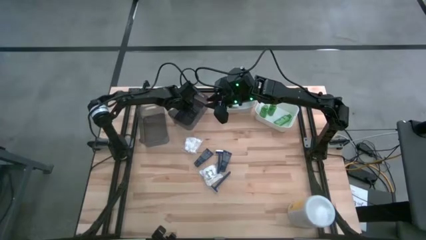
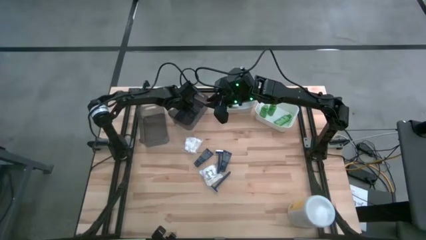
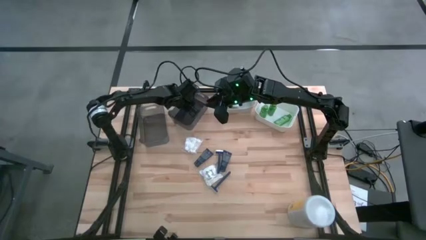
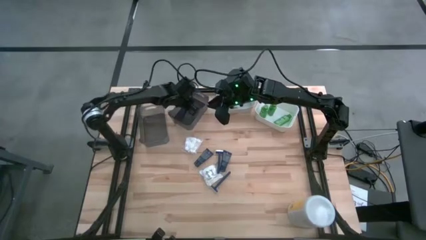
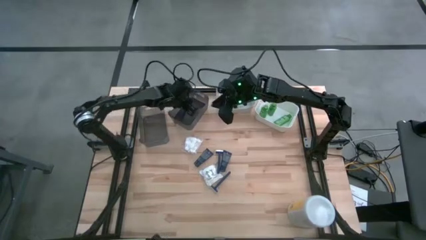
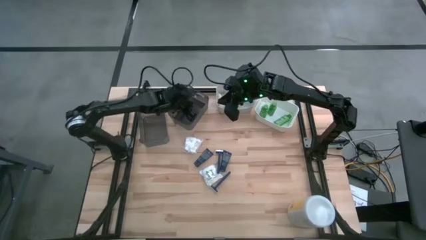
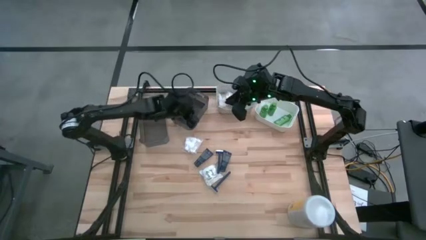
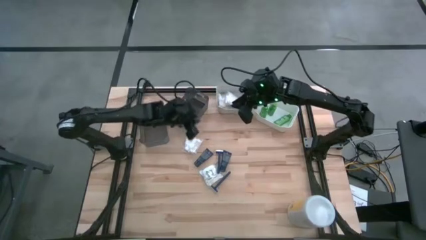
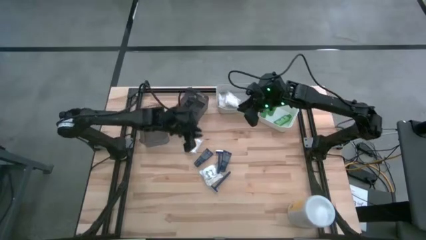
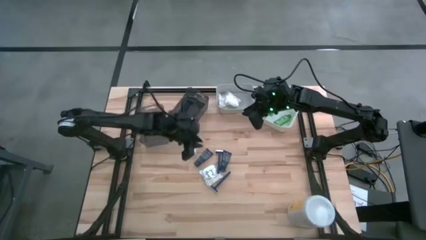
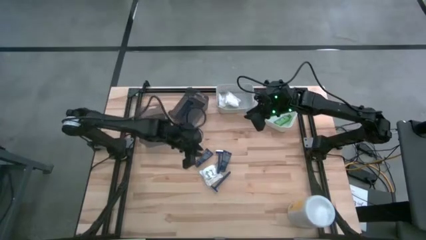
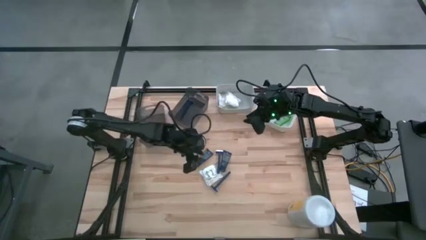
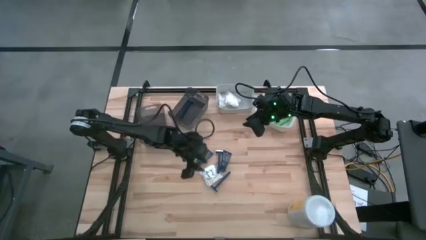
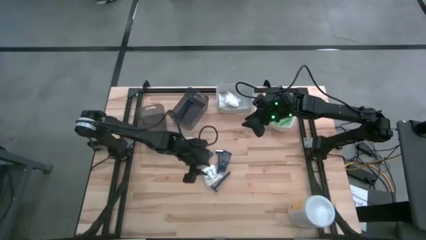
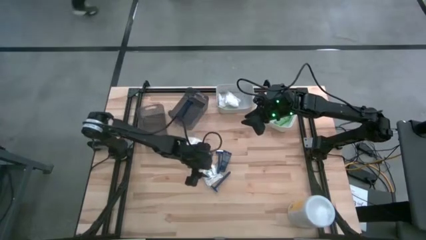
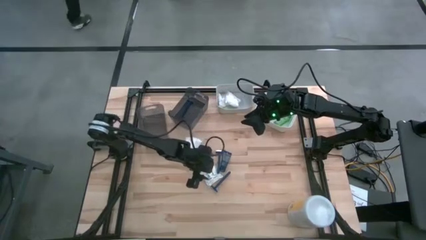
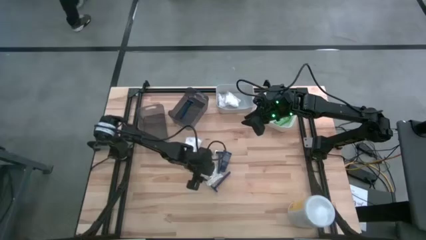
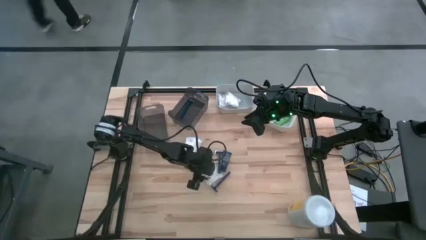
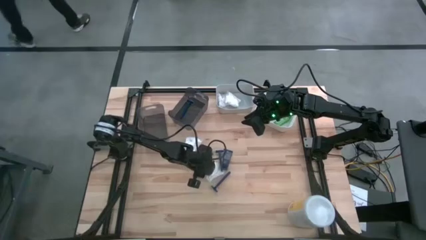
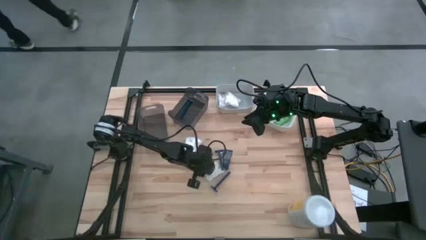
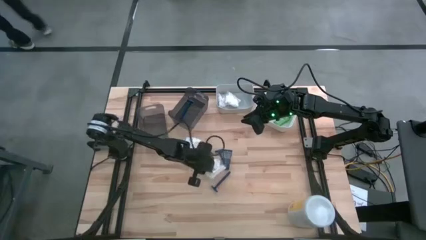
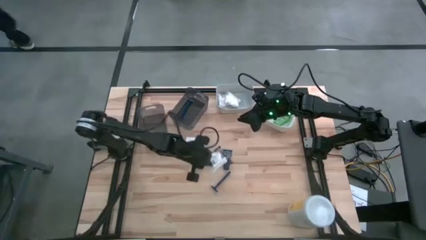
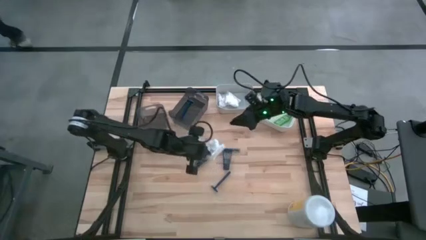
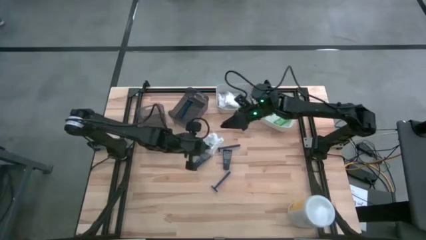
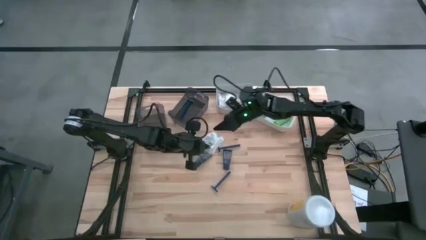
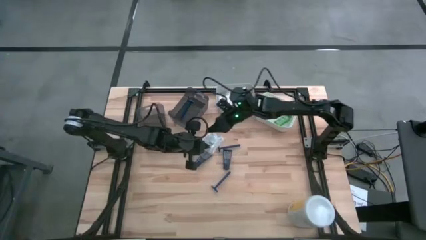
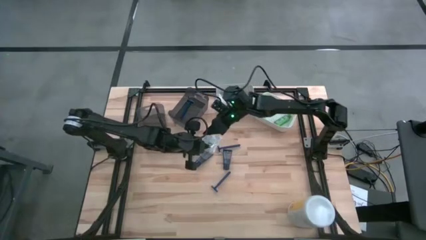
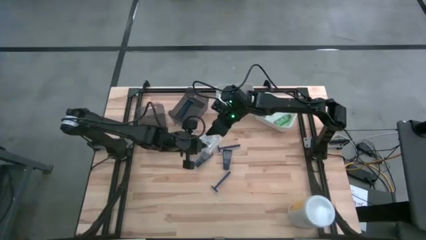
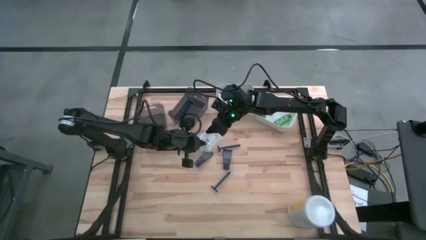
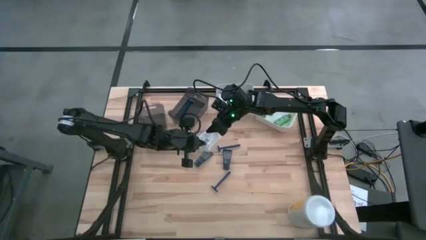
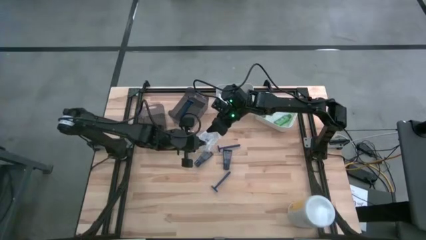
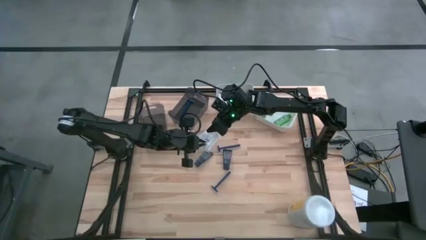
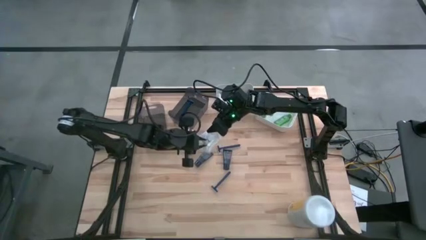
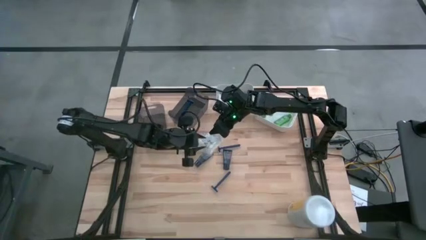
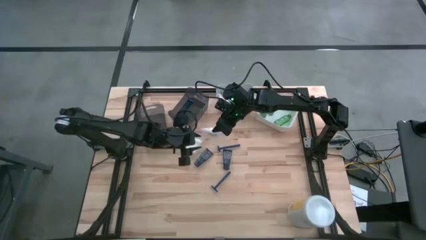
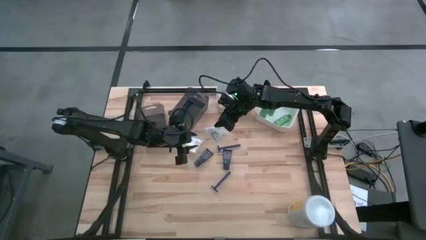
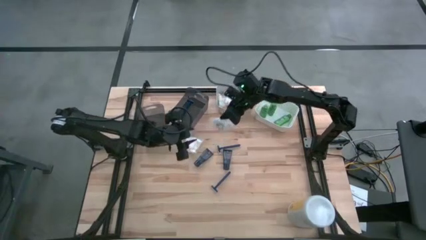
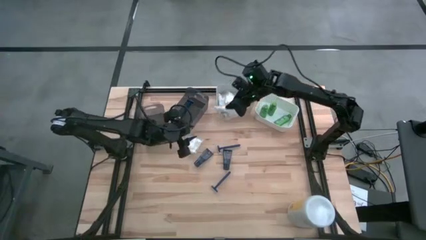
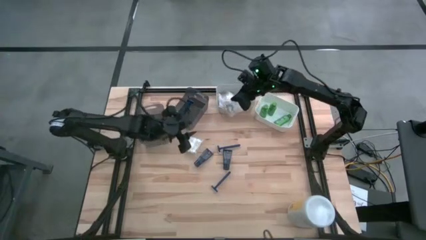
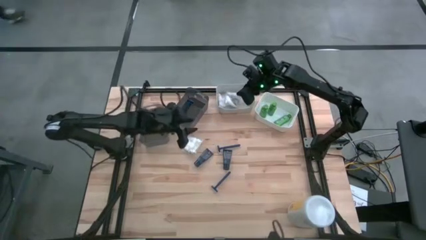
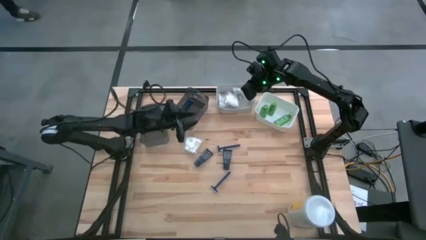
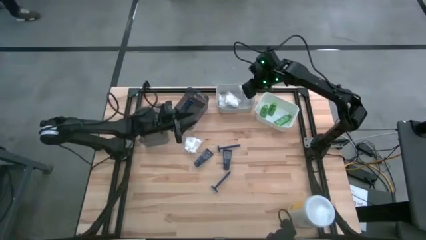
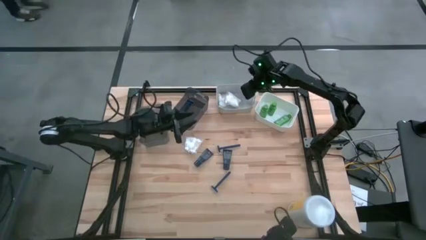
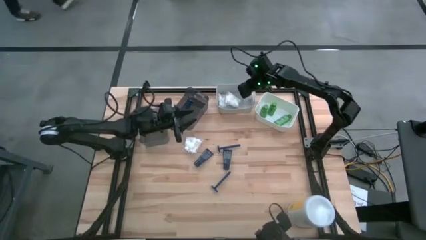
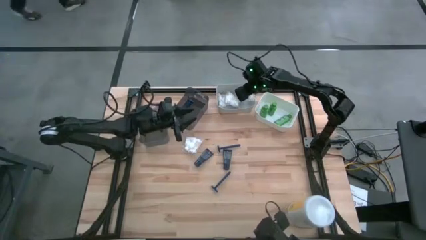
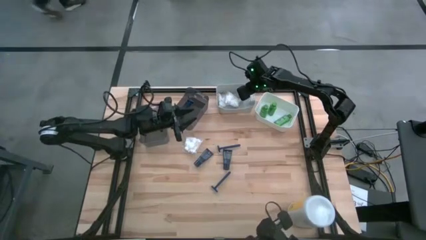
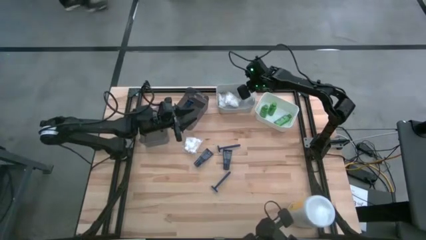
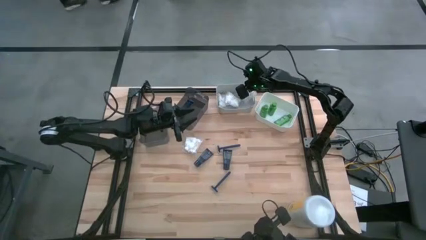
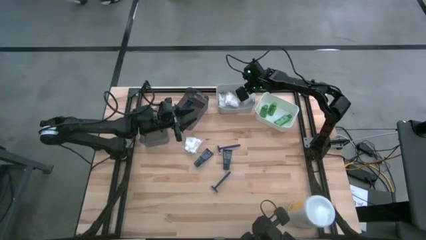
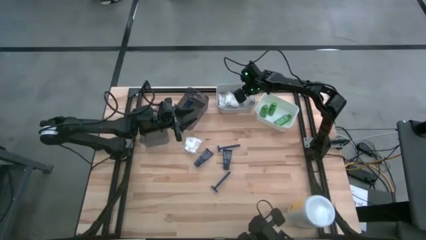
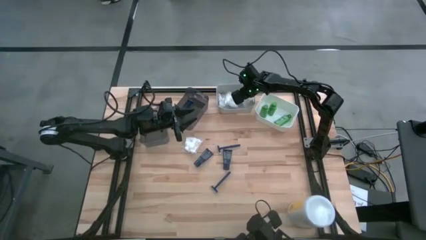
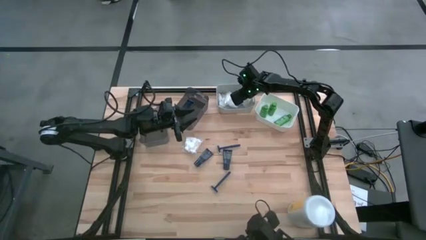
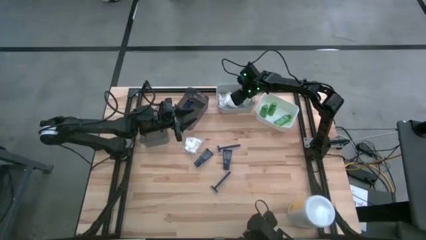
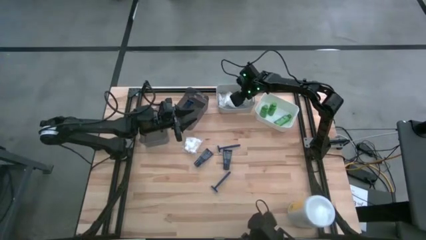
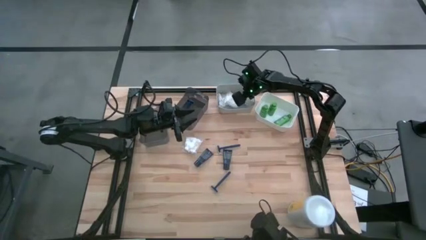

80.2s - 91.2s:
Task: Pick & Place Travel size toiletries
Put the bottom cotton pack into the gray bin
